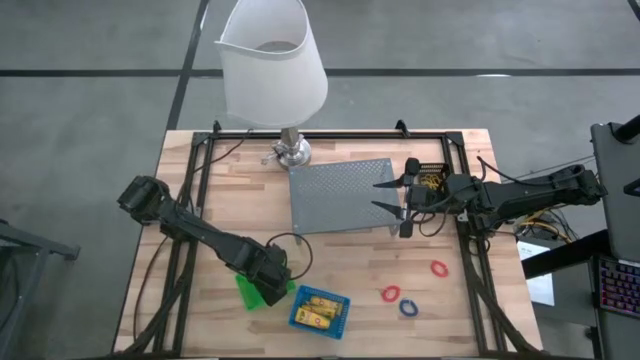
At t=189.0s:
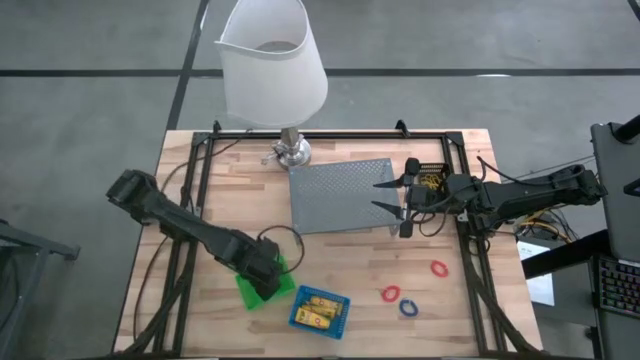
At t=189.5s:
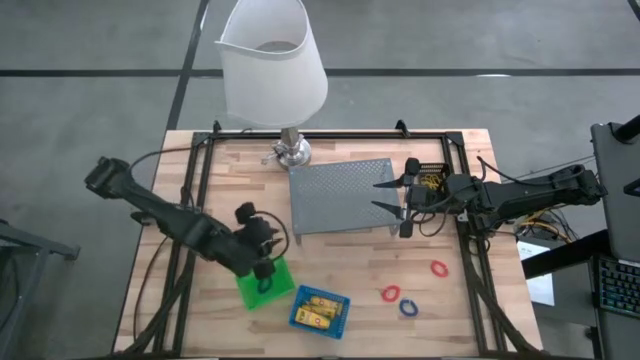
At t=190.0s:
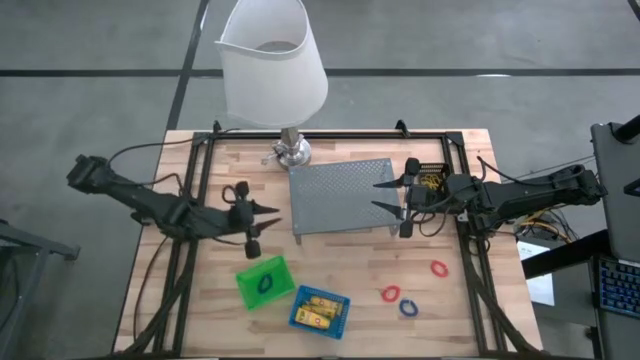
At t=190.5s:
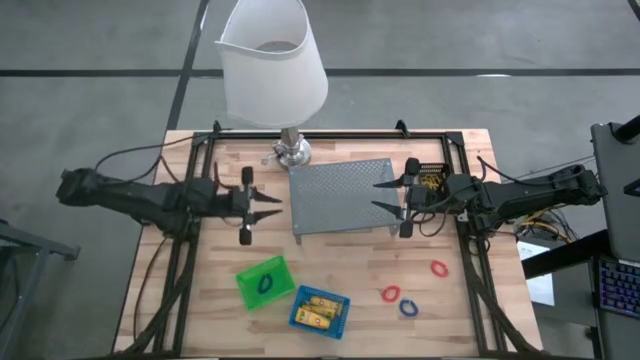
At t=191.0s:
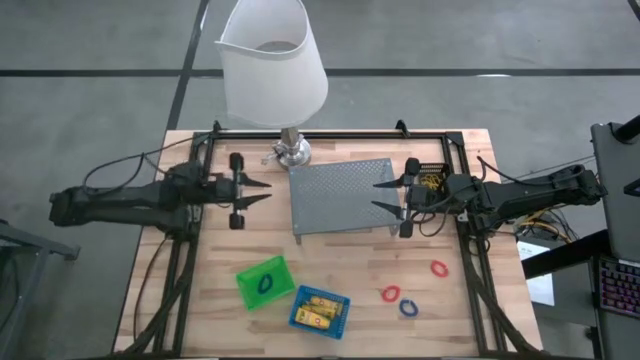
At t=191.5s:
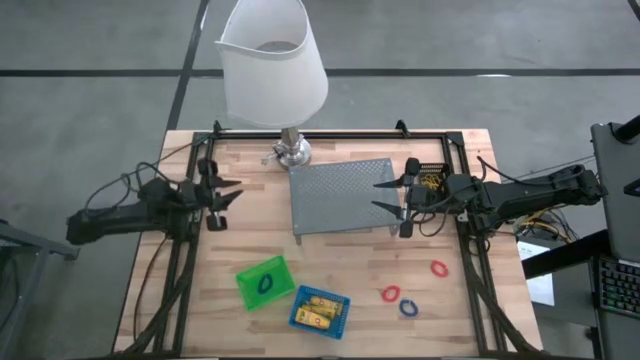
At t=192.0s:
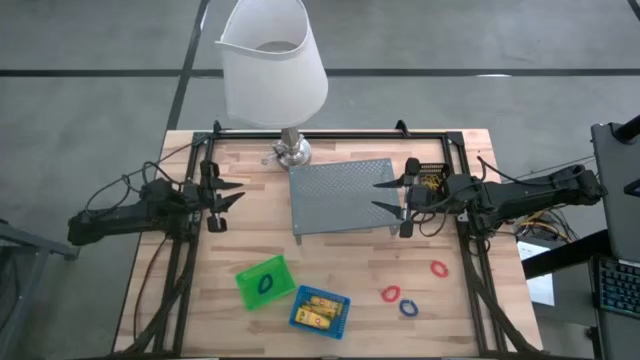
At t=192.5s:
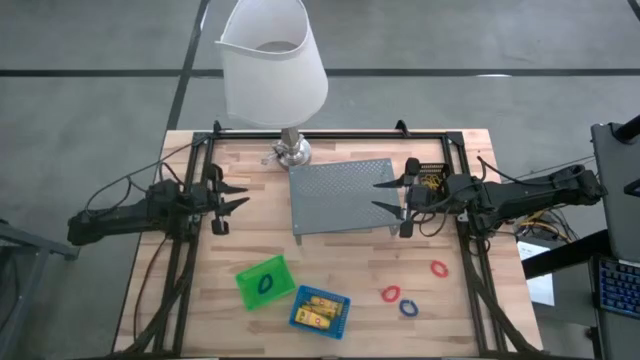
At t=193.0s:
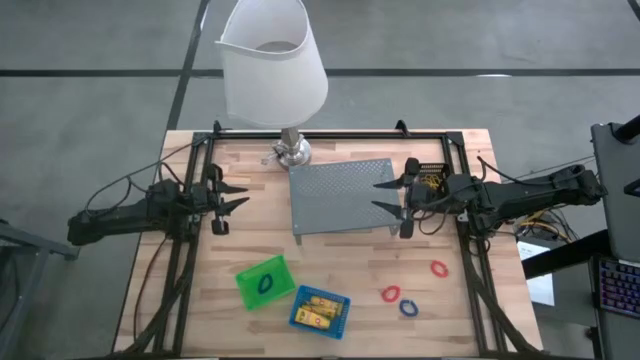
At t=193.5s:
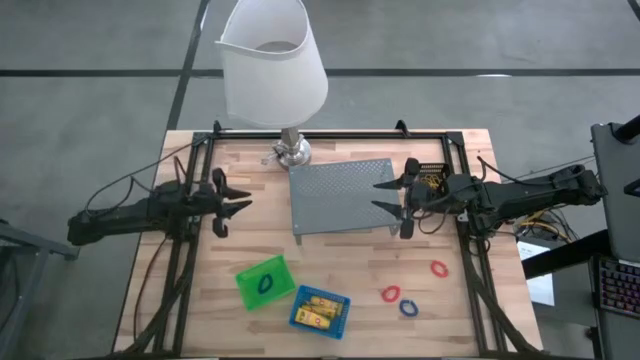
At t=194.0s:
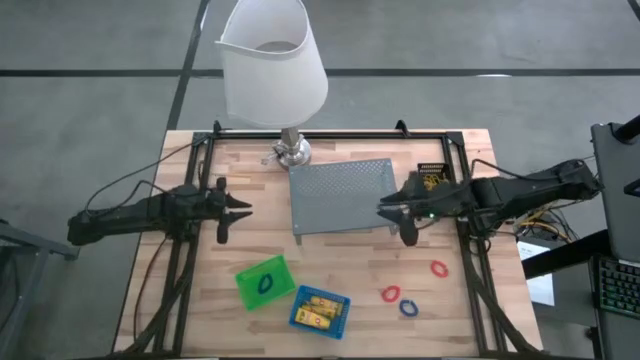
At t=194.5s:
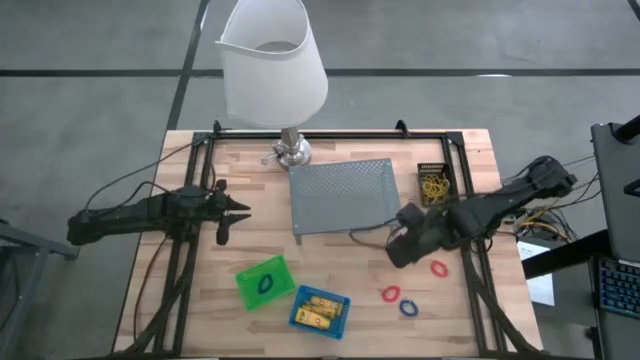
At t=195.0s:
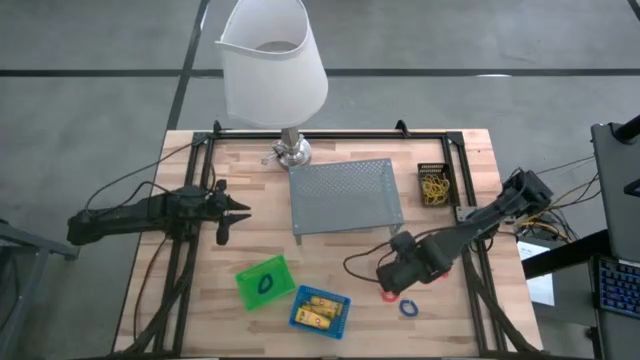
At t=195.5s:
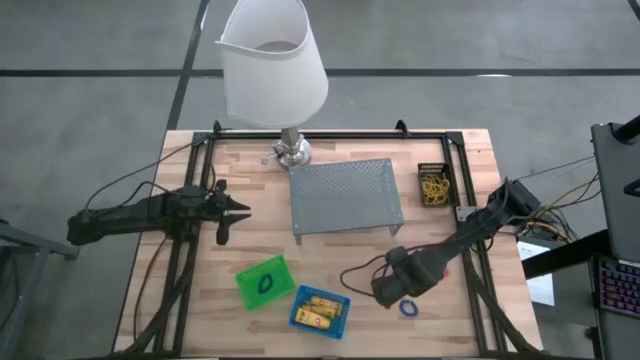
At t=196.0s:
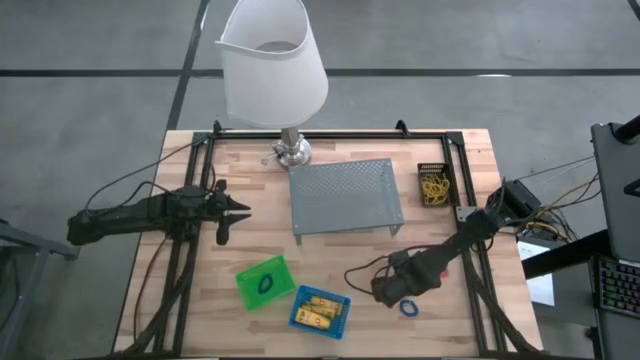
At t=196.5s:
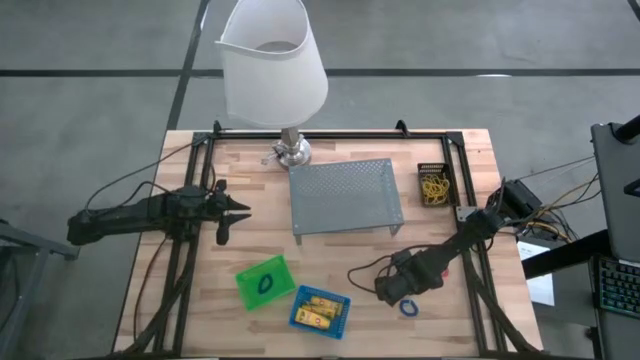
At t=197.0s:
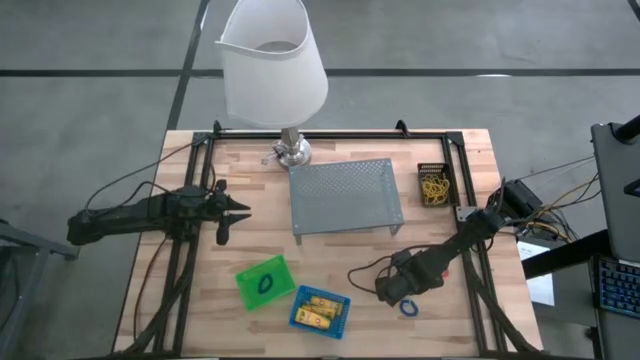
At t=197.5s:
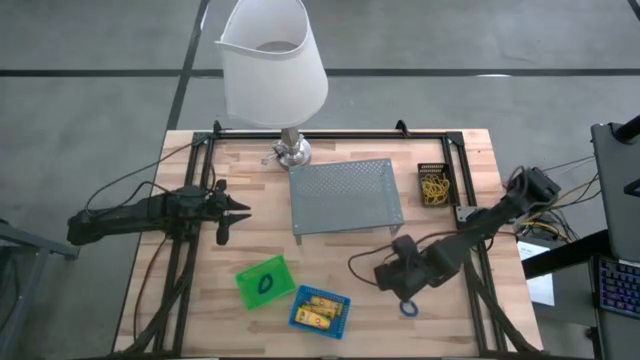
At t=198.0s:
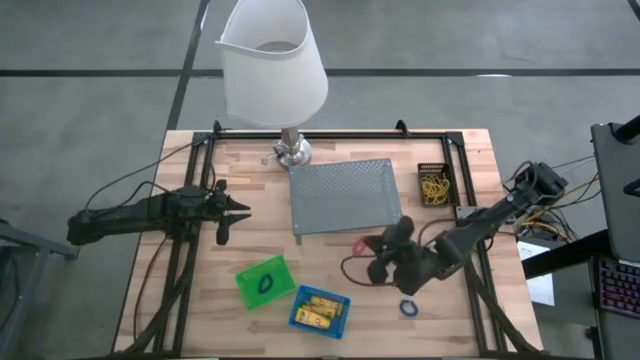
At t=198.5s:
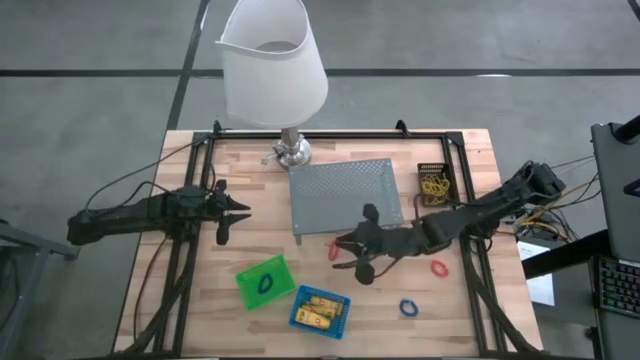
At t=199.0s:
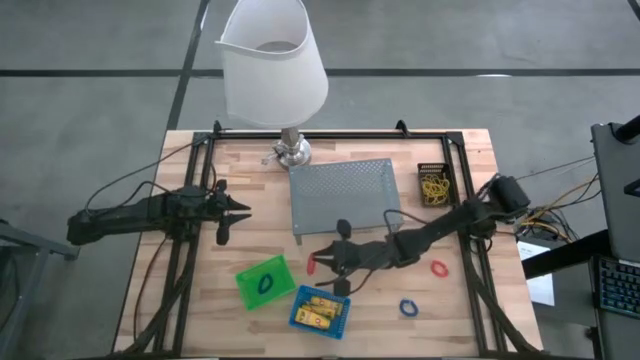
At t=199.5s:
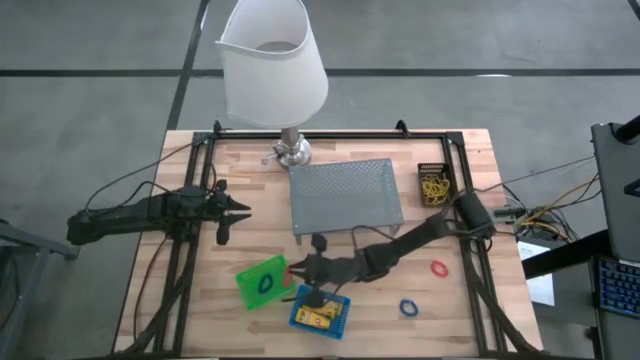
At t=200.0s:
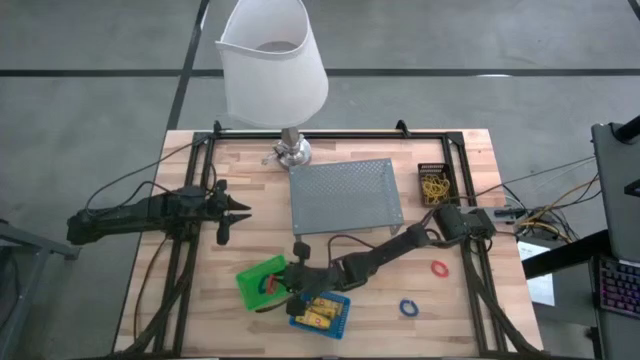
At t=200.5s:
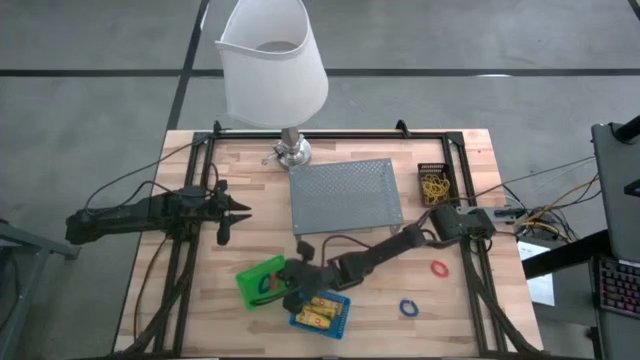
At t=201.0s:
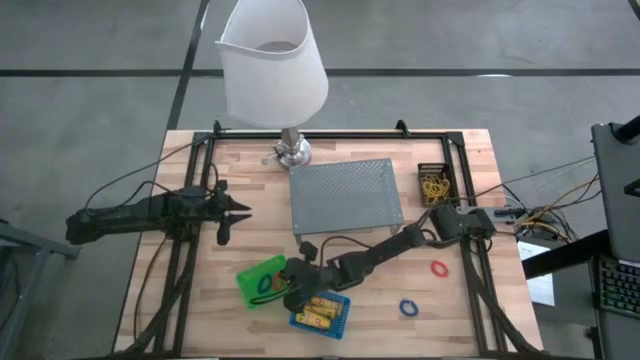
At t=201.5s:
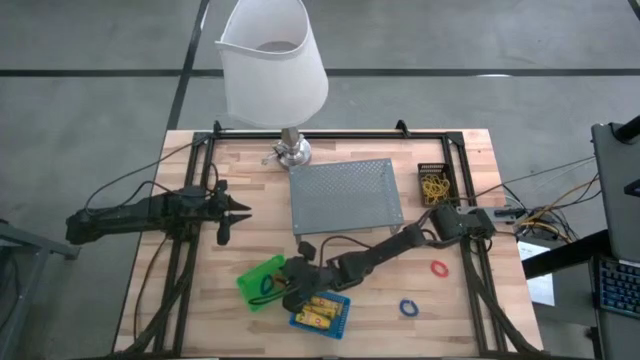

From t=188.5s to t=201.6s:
Task: Pick & Place Office Desk Supplies
Put the left orange spring rubber band into the green basket

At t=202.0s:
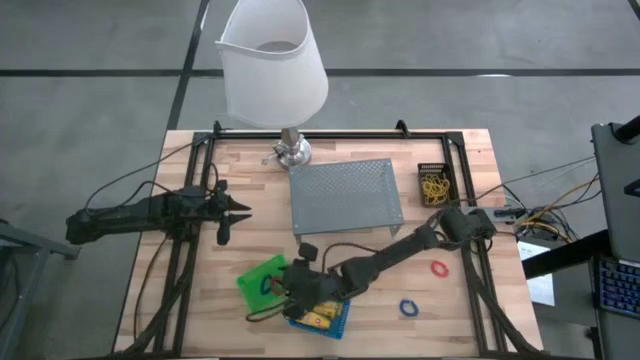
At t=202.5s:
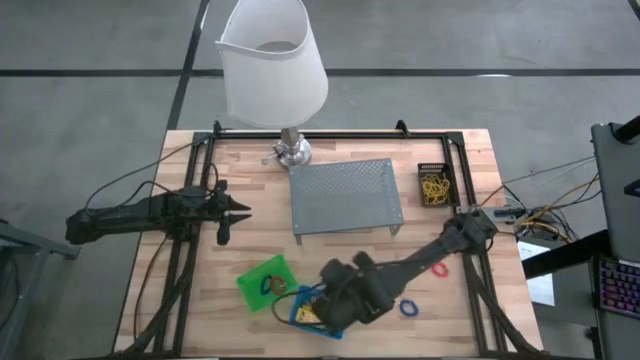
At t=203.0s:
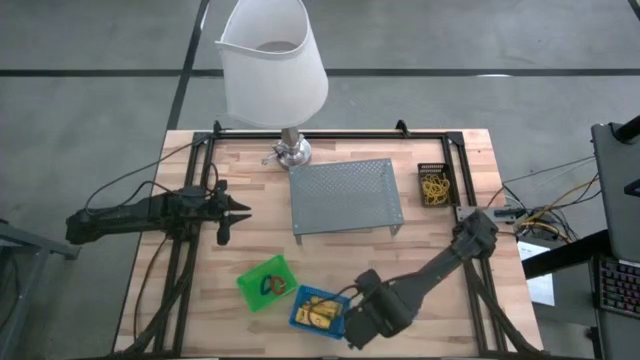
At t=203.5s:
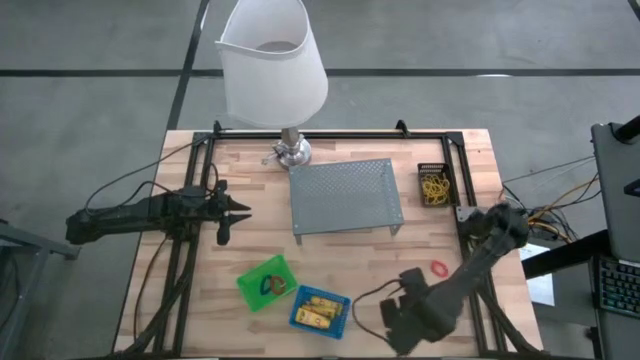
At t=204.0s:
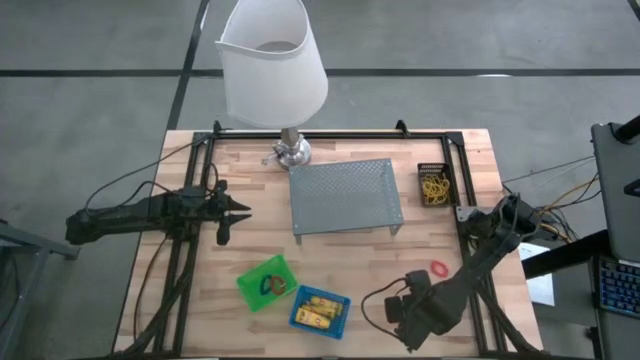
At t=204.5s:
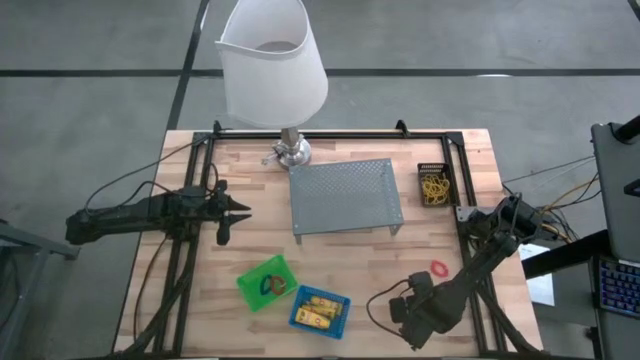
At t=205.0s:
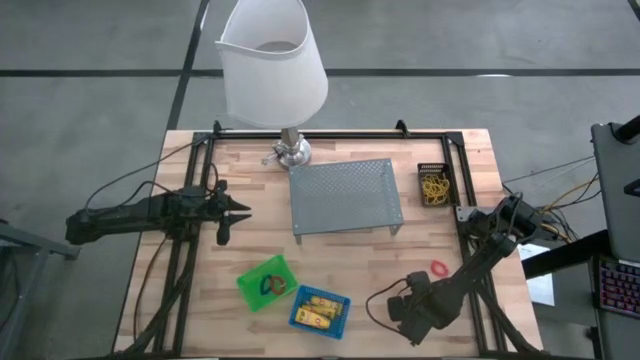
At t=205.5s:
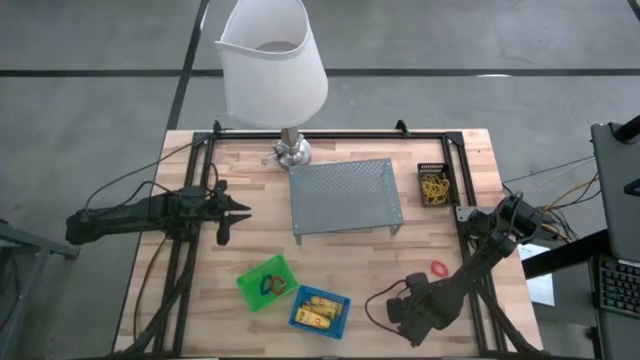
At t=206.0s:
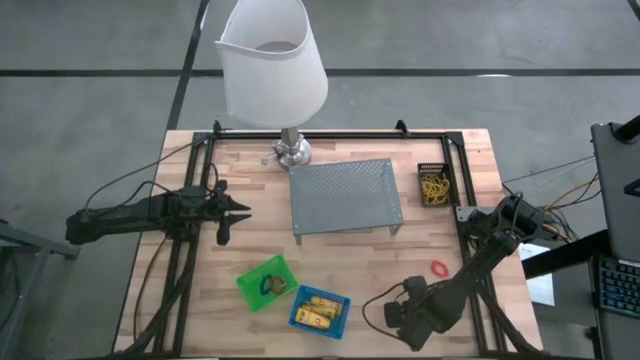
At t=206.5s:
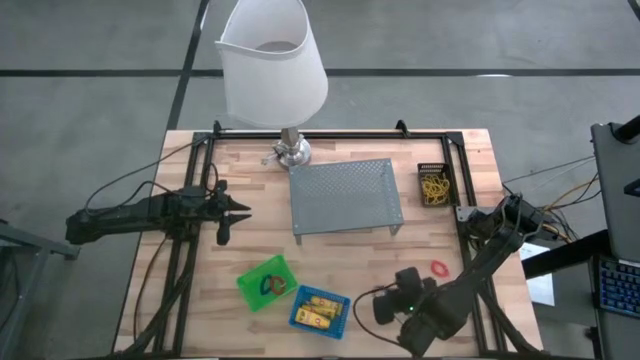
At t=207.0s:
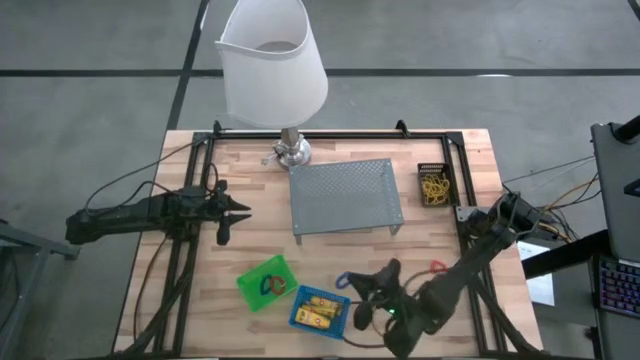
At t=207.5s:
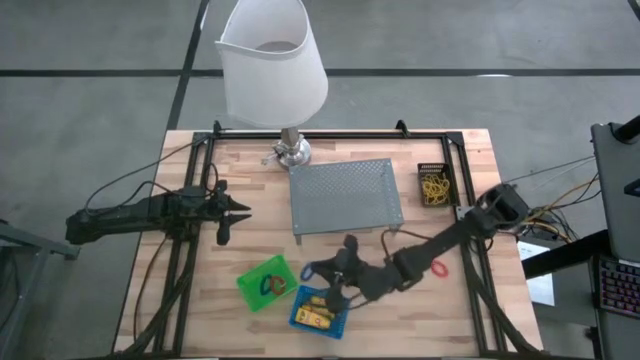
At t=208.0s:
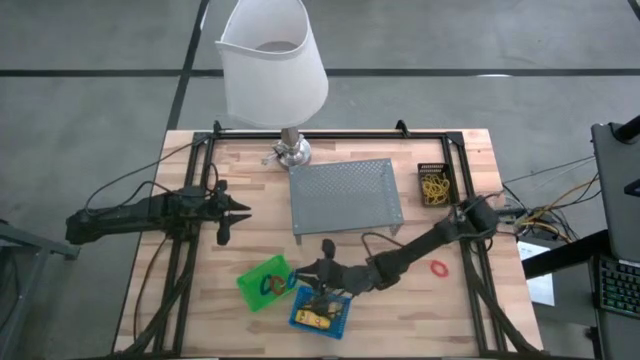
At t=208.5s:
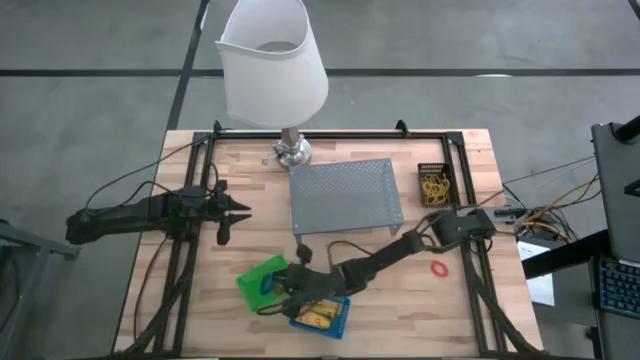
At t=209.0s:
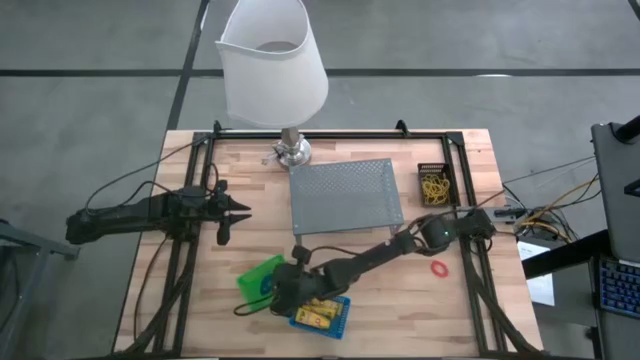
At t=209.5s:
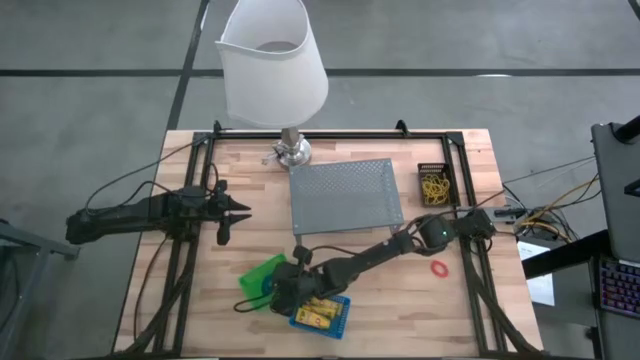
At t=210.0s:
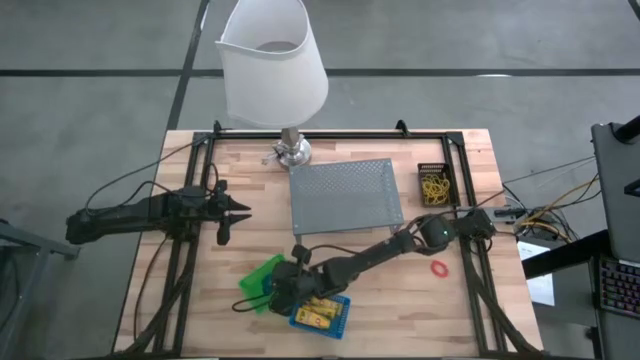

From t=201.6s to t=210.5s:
Put the blue spring rubber band into the green basket

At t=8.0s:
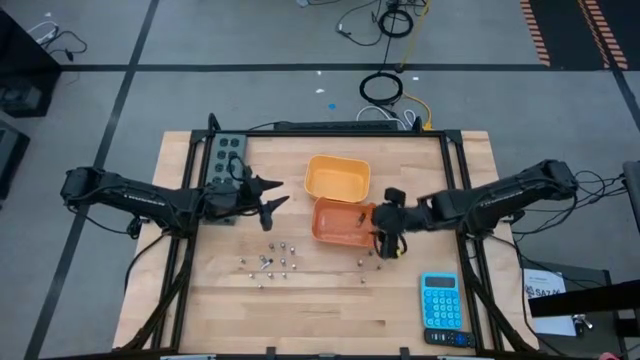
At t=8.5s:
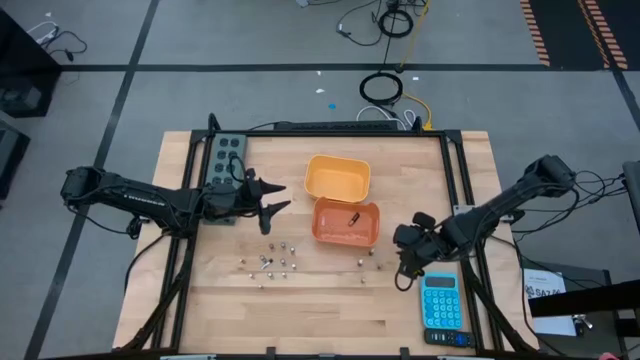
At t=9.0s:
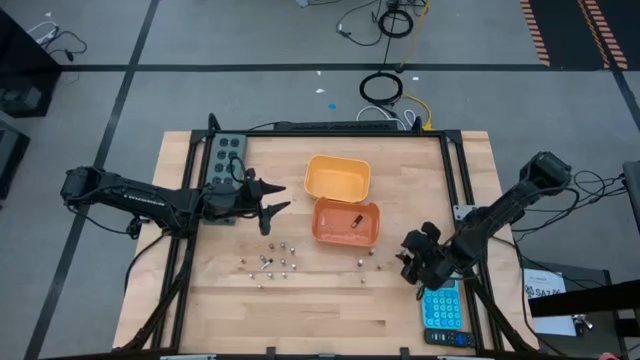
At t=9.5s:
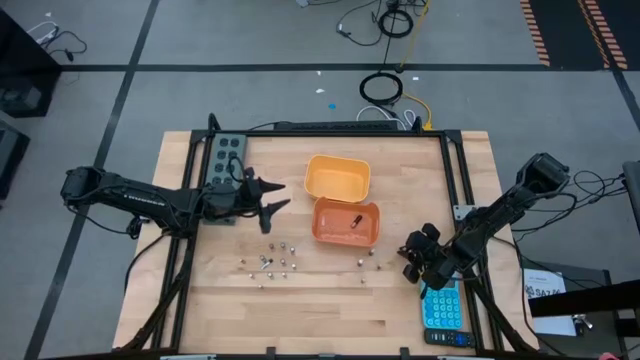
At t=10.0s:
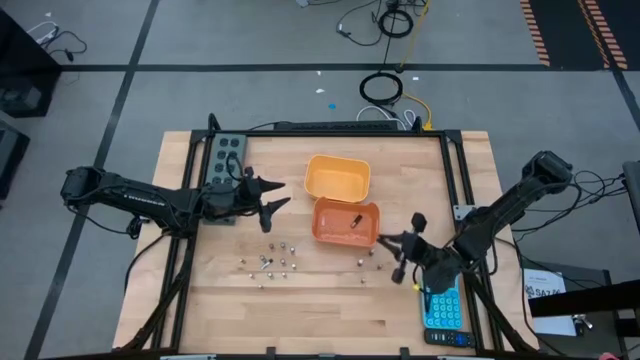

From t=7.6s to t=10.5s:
Task: Sort batteries
Put the black battery into the orange bin
